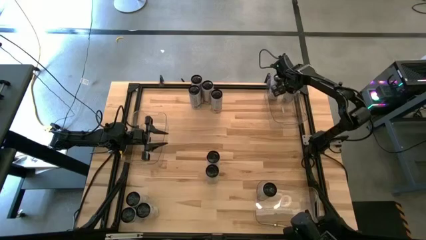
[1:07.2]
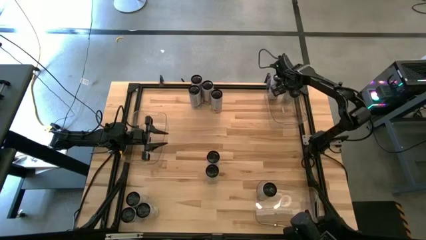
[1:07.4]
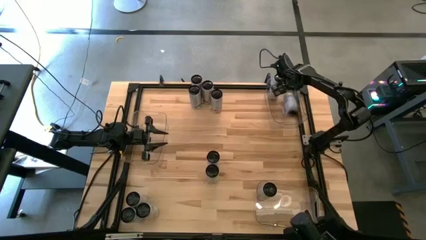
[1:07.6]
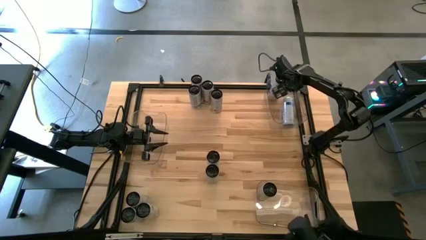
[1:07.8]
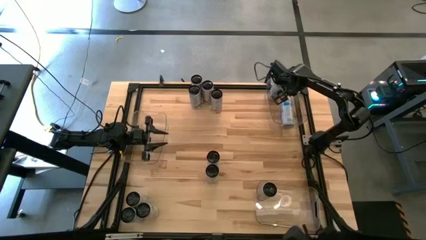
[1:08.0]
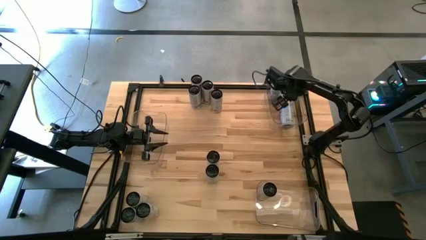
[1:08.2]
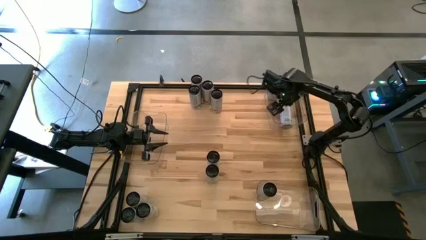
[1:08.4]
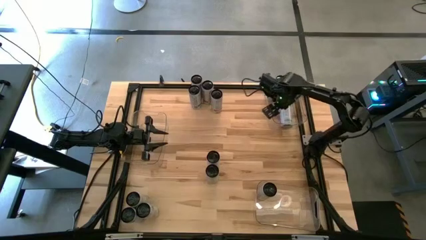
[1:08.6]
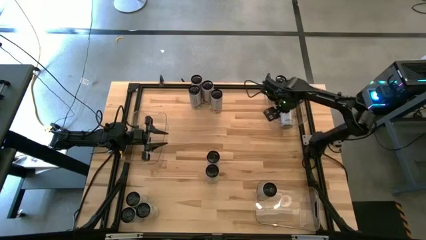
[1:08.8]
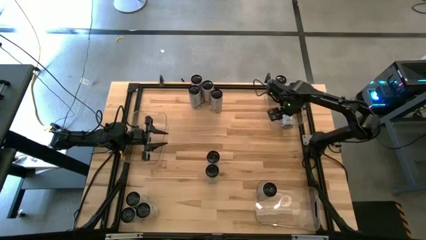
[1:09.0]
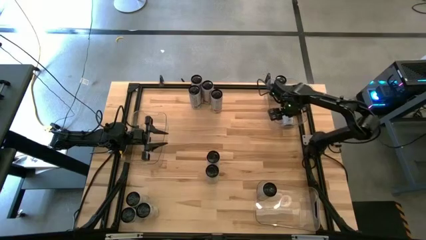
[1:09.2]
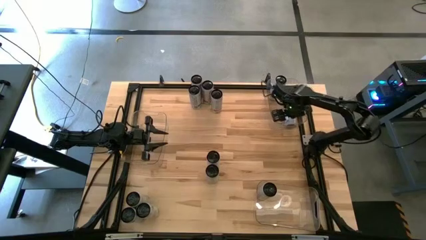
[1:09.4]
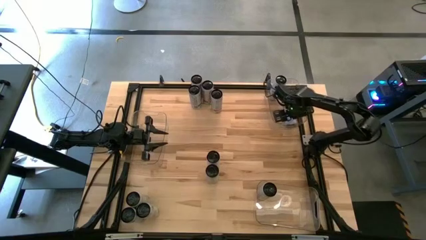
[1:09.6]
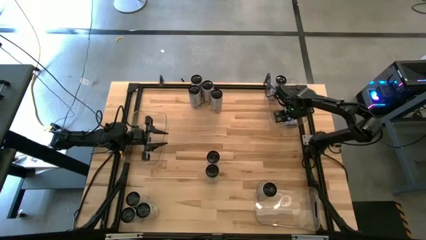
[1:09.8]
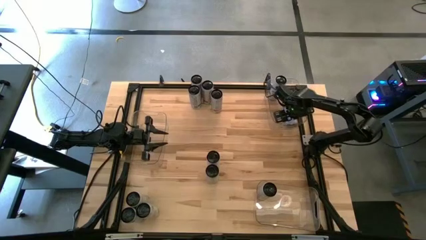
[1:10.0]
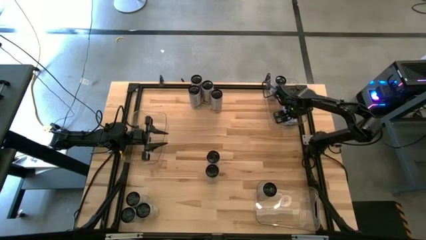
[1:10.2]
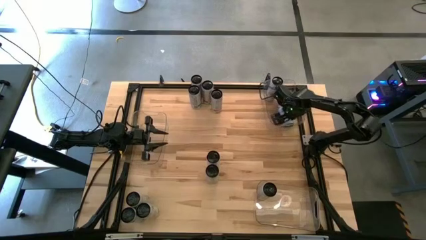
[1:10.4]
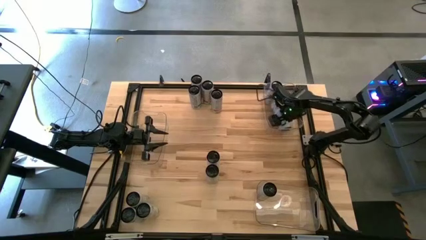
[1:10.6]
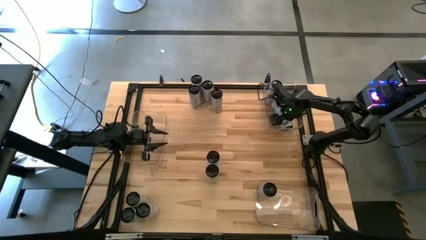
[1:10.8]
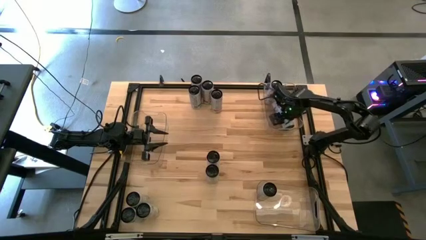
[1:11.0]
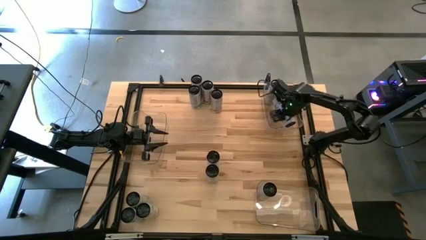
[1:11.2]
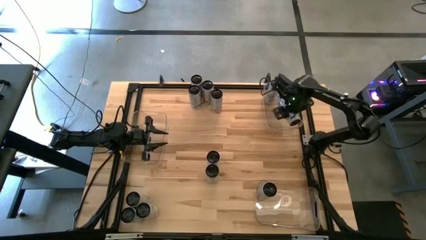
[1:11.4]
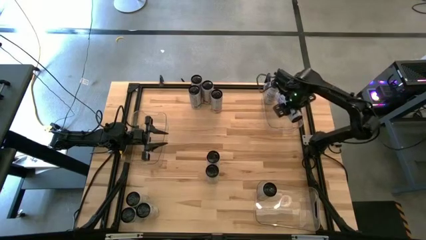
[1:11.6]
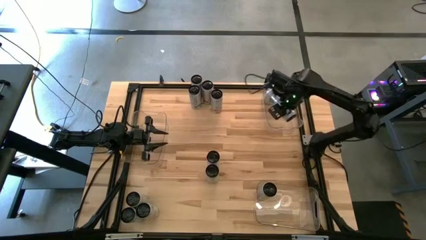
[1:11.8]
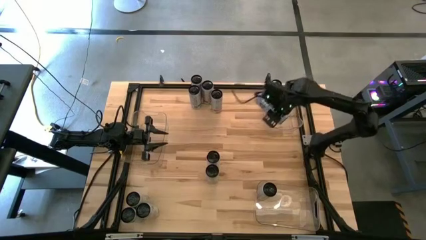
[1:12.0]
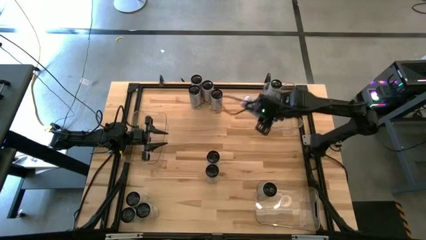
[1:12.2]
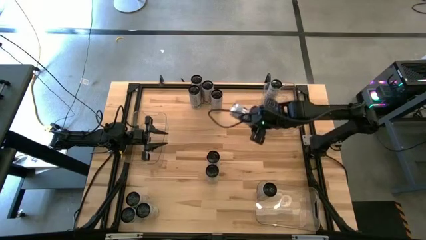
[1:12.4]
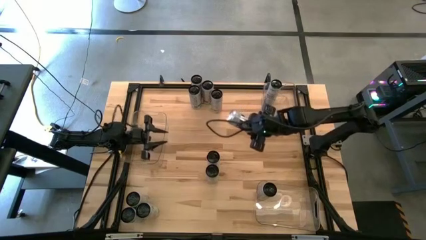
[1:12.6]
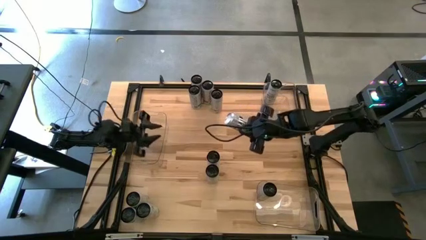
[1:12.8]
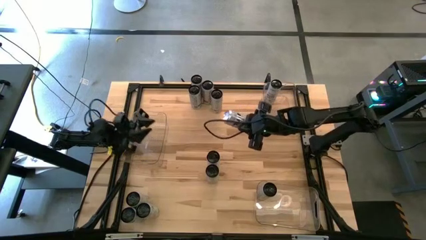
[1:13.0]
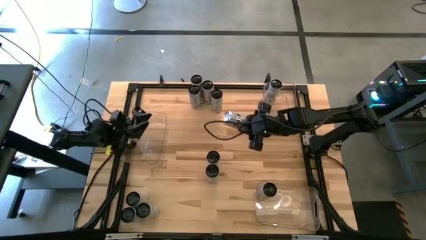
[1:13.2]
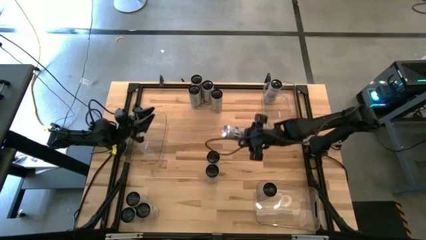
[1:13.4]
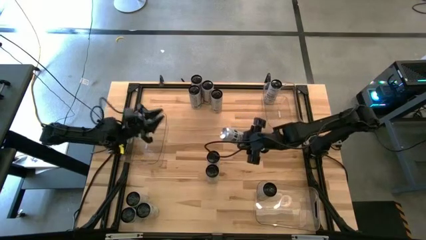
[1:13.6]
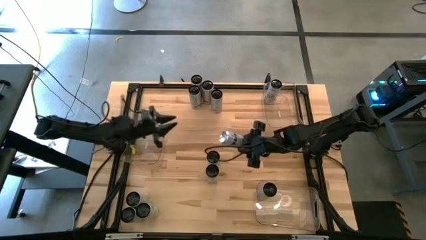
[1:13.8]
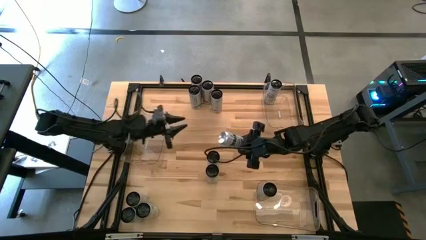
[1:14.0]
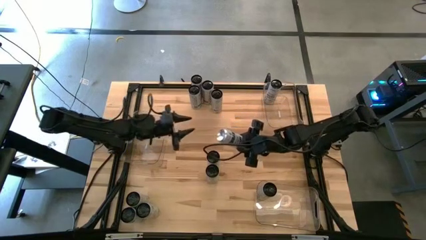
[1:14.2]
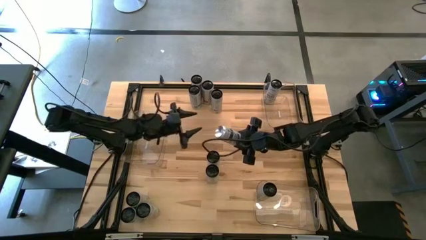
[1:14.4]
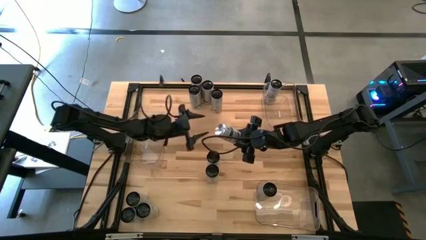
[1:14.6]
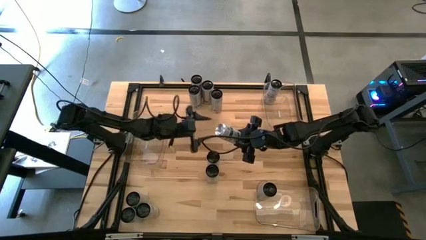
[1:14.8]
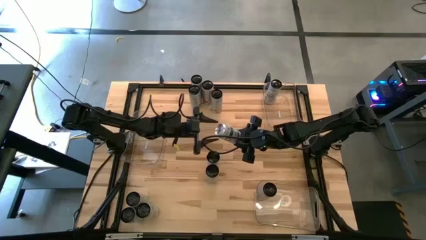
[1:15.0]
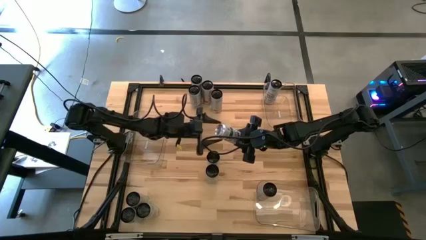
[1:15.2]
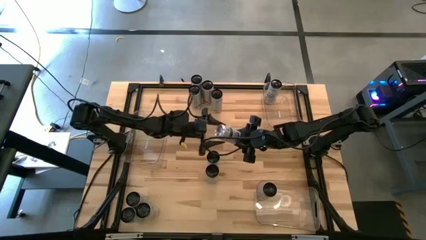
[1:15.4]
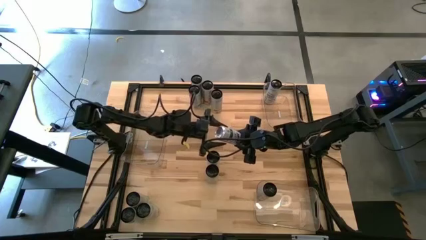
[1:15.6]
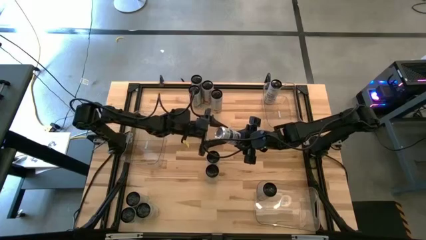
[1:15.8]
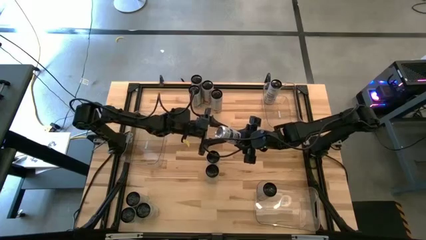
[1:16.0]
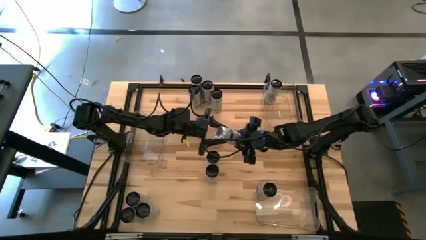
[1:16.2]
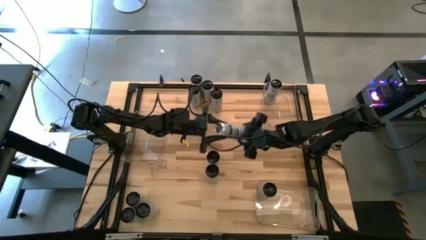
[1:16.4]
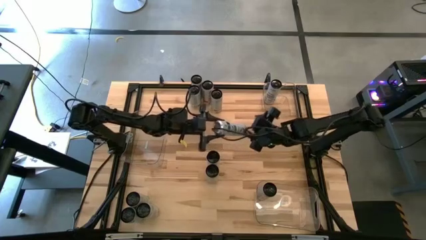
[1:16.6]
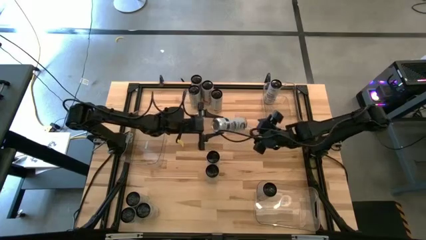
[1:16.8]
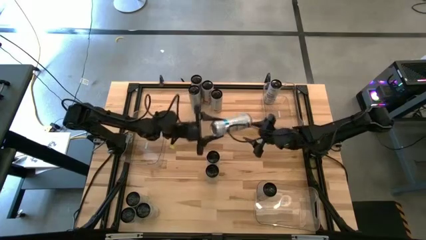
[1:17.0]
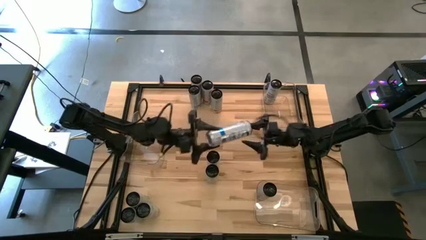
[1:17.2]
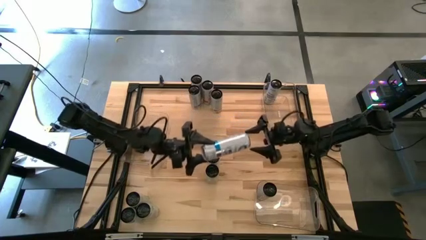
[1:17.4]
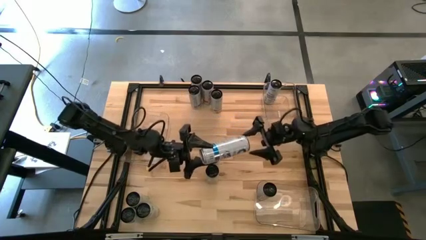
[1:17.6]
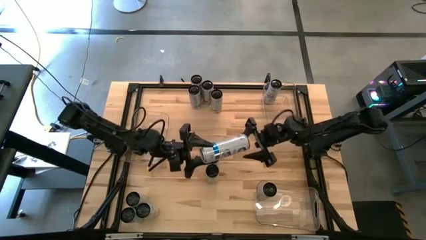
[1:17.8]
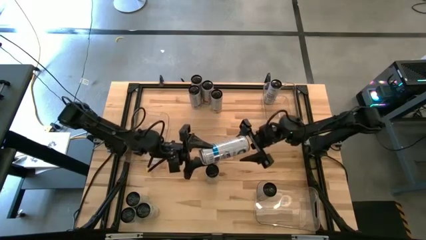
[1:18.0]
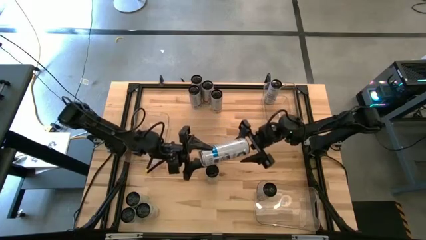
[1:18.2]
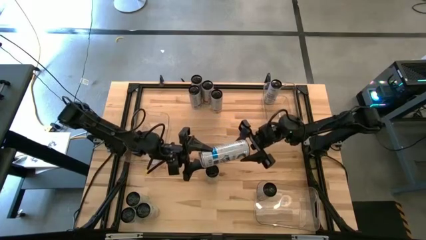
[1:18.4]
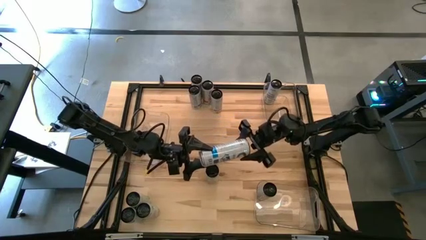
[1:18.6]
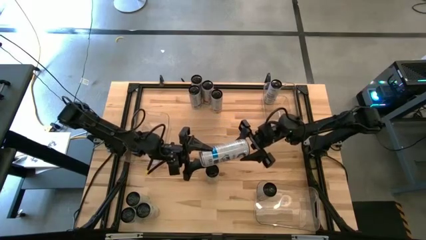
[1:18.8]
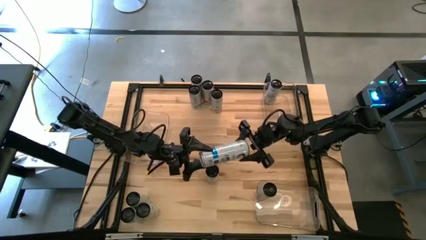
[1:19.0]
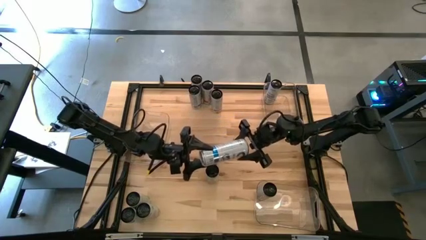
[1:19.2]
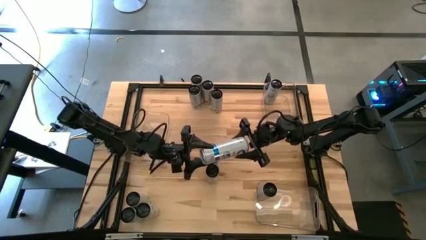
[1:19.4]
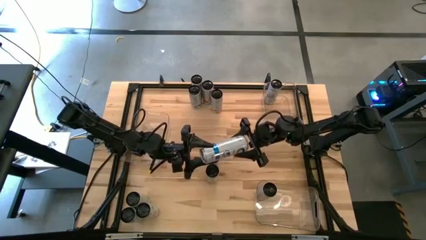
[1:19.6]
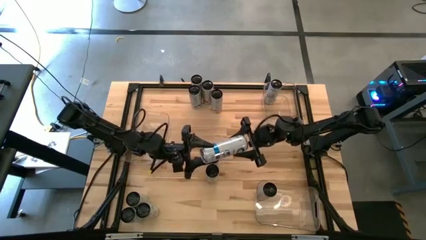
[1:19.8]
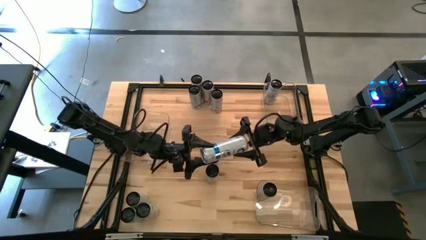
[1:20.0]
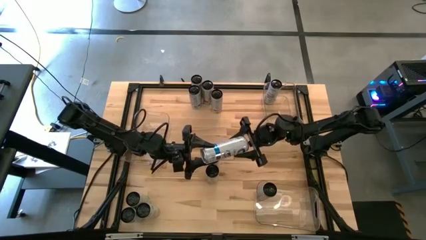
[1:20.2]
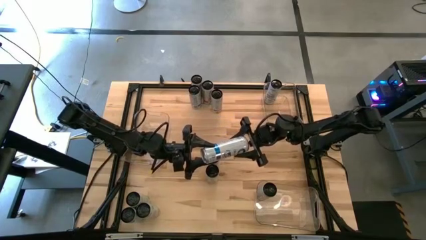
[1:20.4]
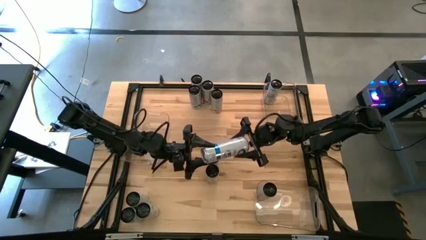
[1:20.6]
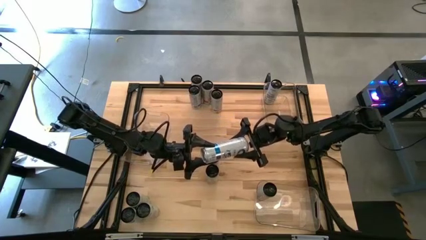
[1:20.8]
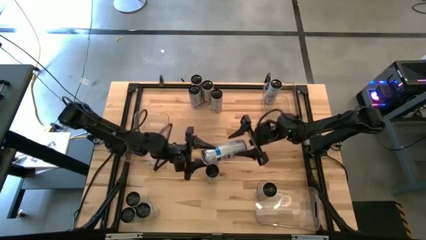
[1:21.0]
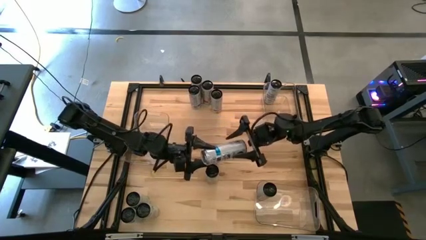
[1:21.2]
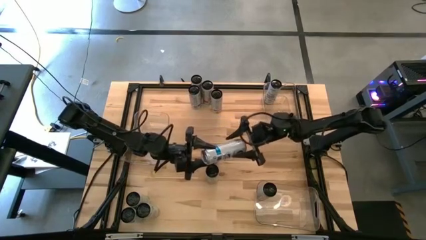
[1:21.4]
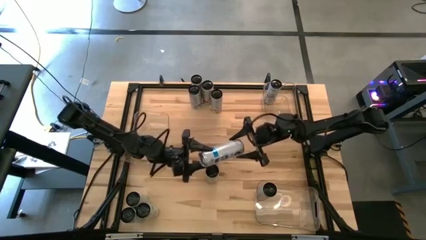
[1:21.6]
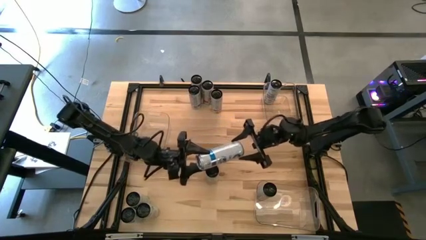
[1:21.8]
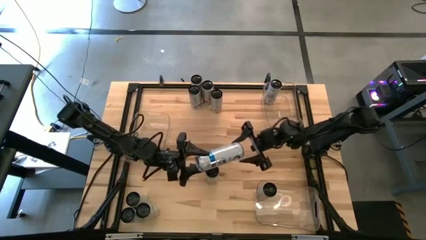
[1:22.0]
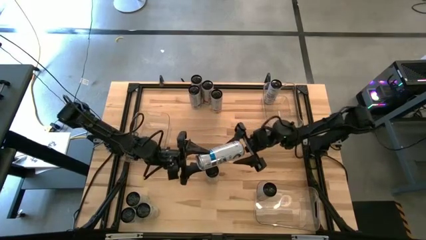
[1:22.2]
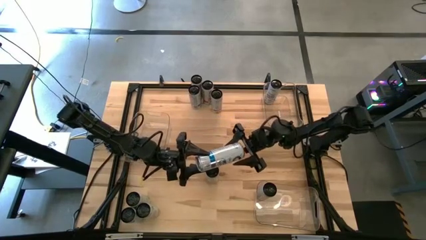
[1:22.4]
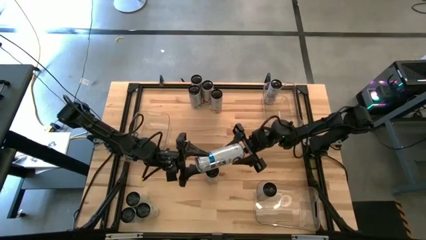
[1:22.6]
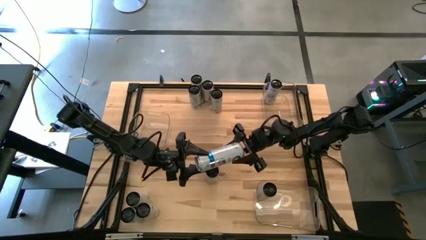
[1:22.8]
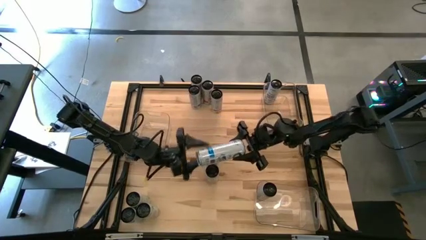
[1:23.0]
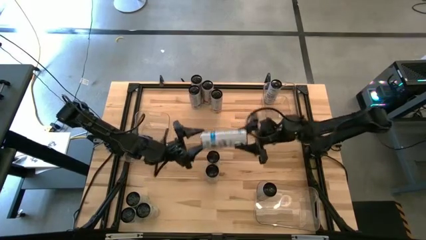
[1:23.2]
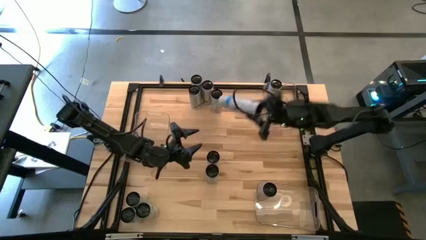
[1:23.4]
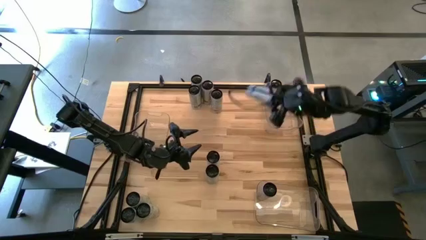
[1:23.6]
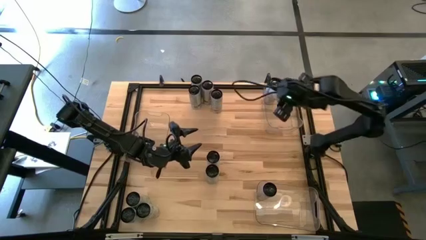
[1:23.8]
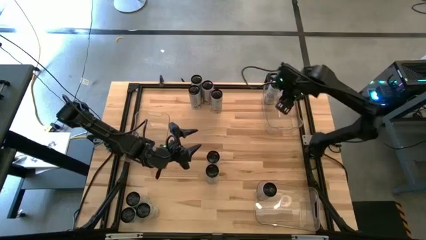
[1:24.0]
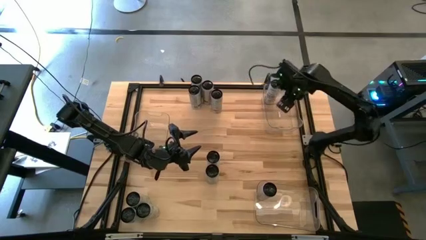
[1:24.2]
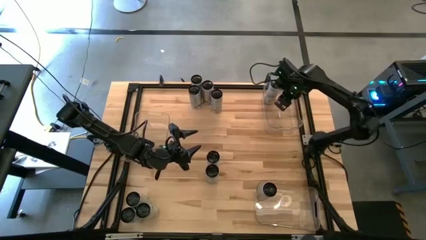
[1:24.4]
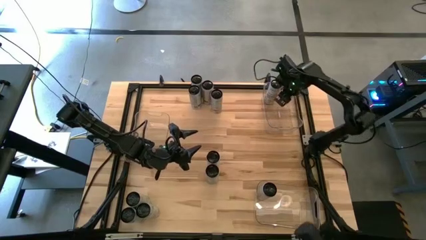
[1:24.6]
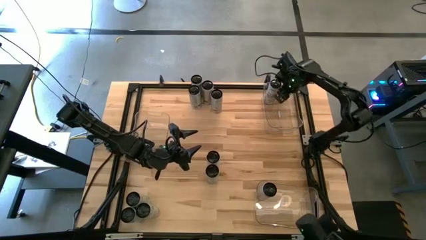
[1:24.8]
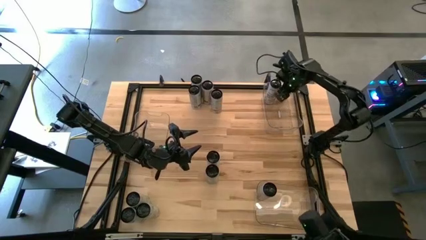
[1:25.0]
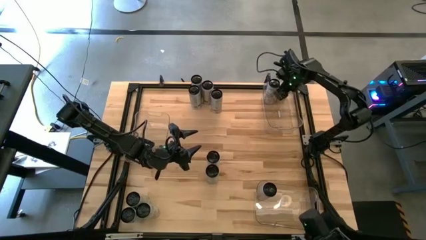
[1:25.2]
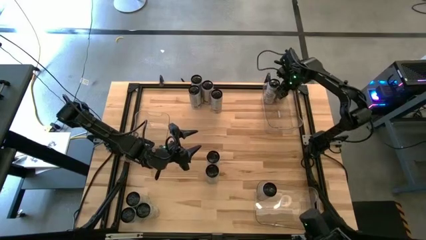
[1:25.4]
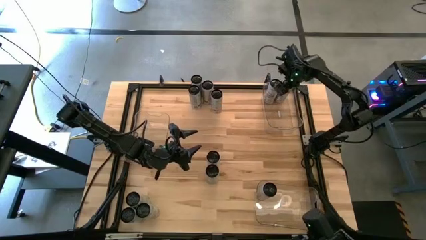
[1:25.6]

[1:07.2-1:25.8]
Task: Sort soda cans
Put the white-blue soda can into the top transparent bin
